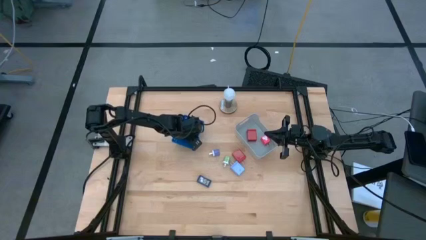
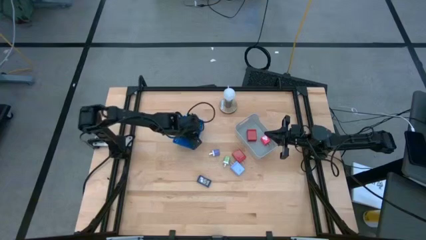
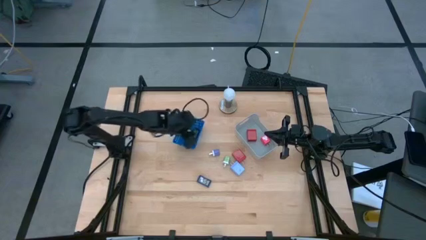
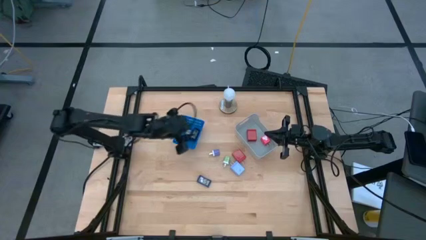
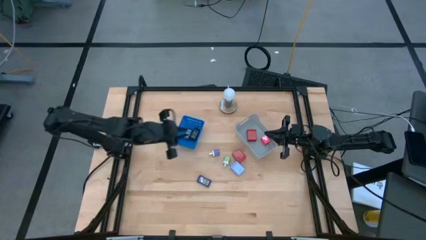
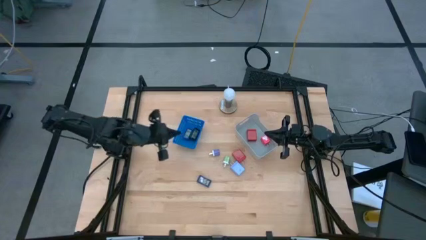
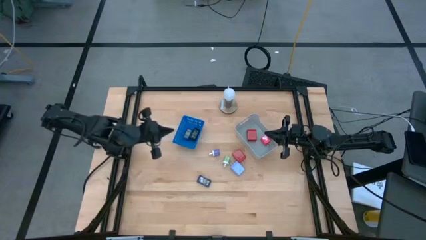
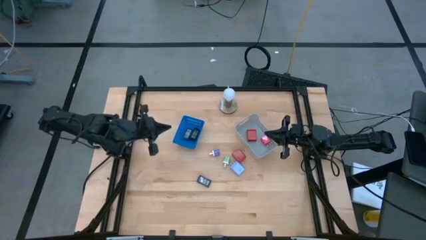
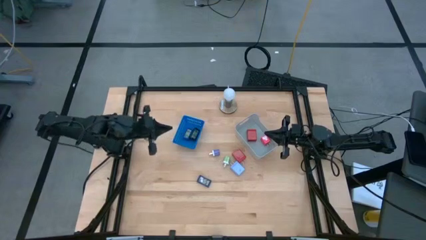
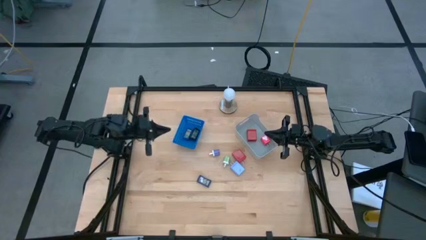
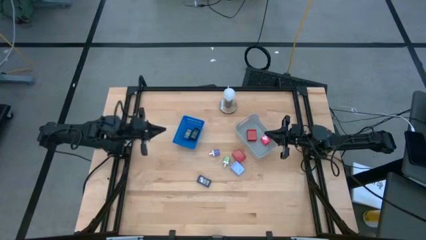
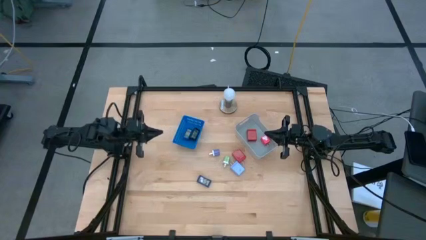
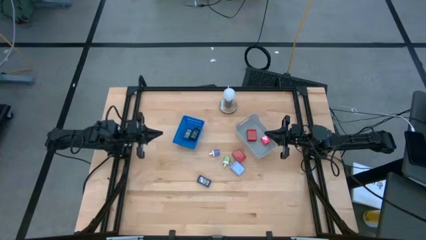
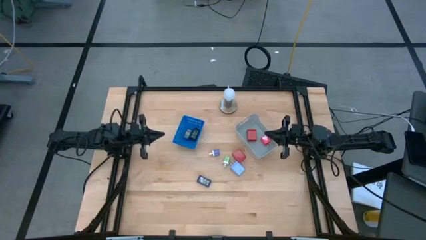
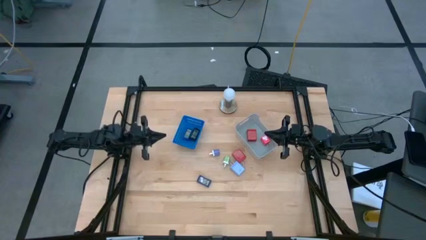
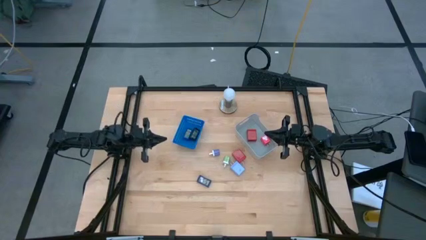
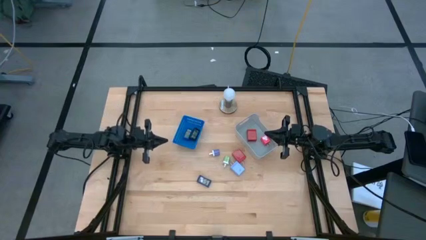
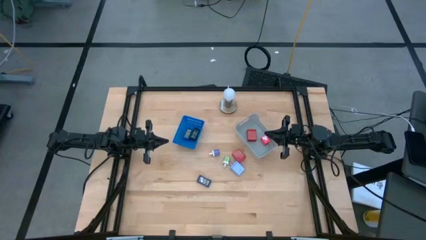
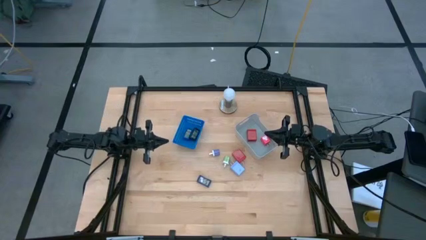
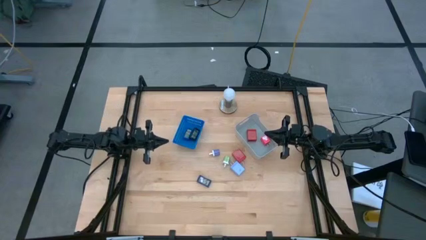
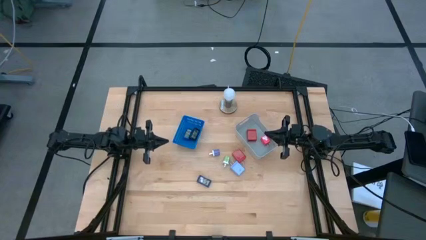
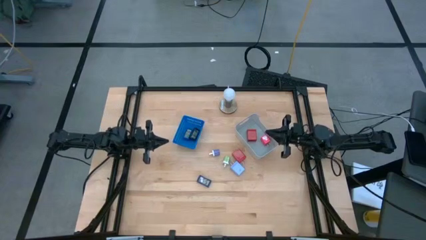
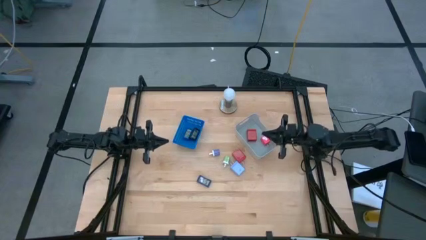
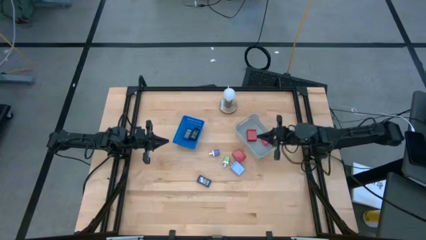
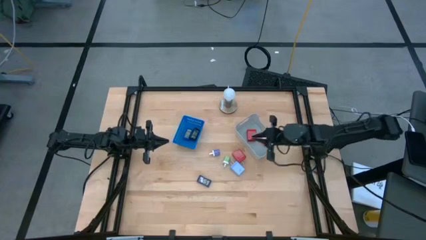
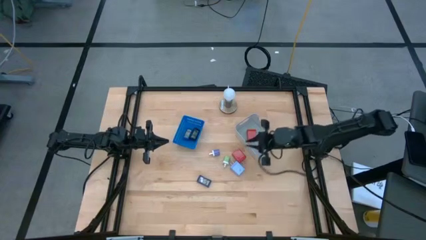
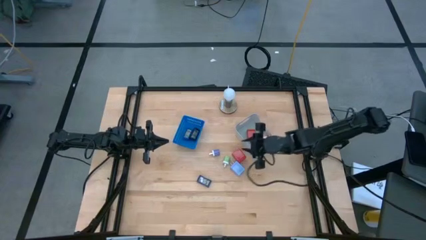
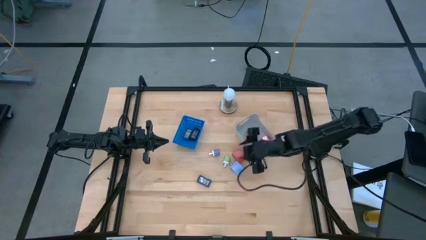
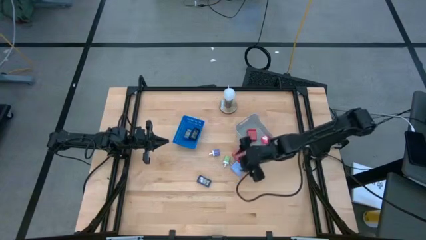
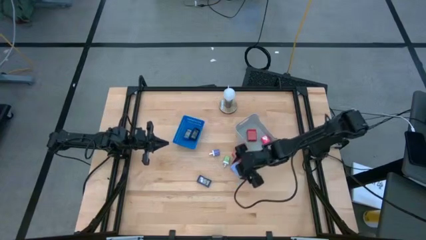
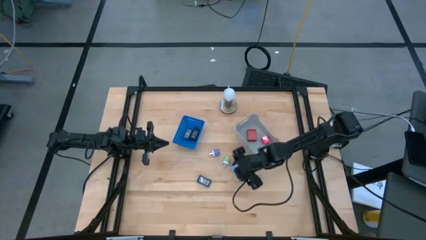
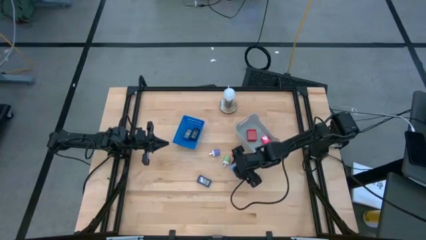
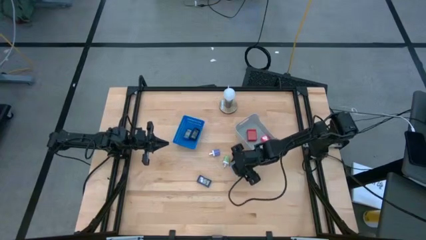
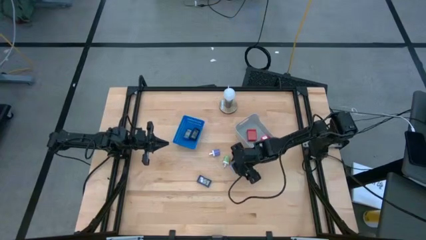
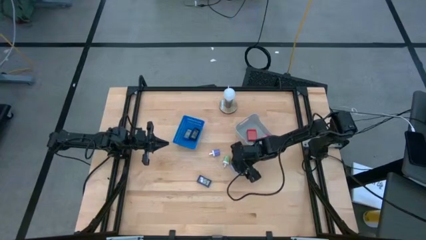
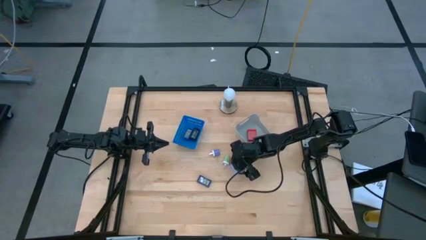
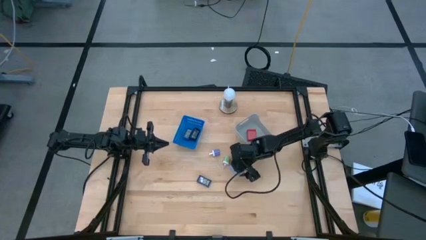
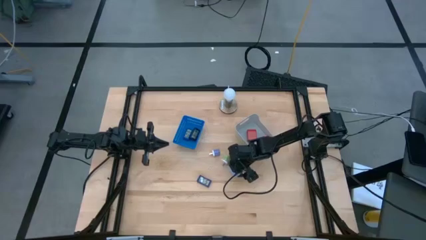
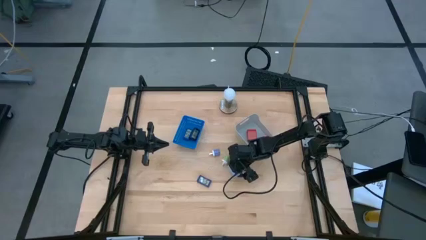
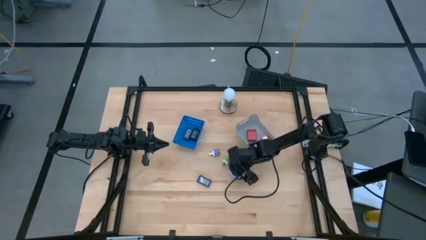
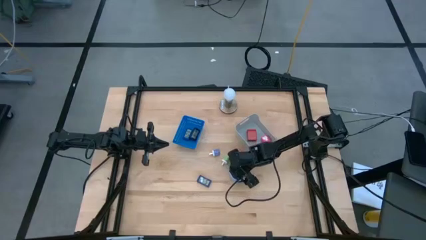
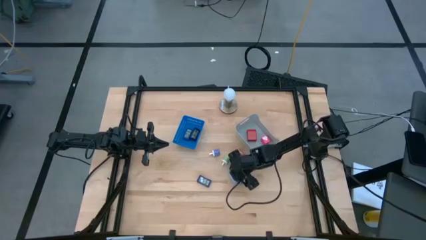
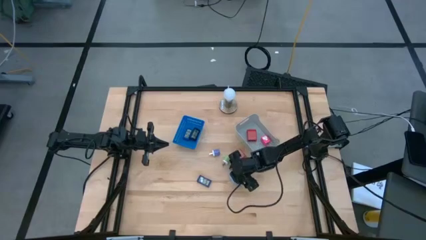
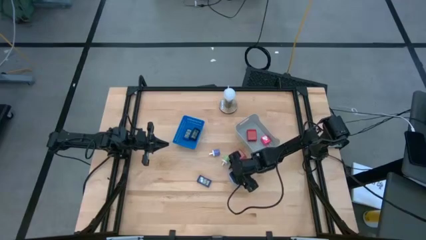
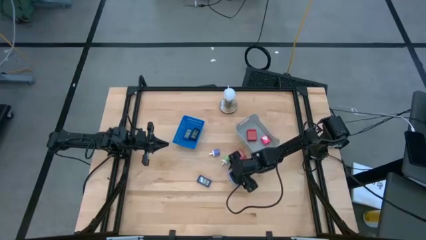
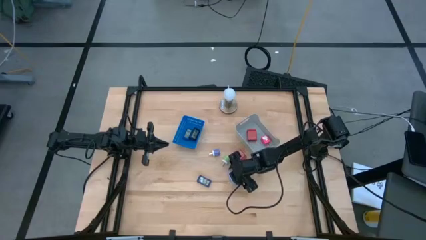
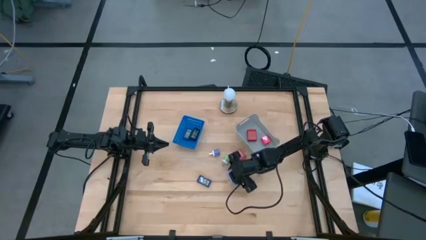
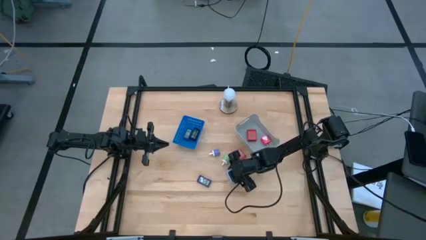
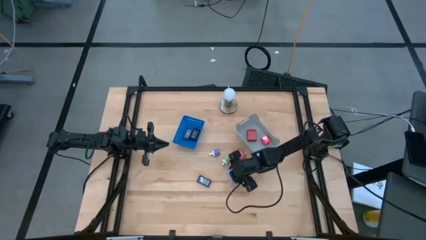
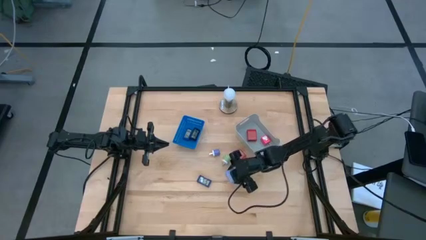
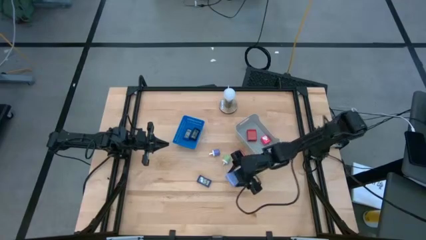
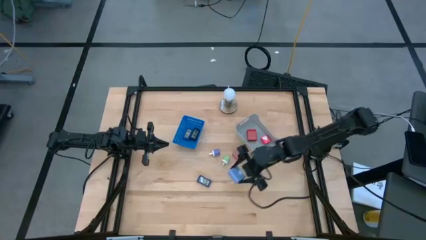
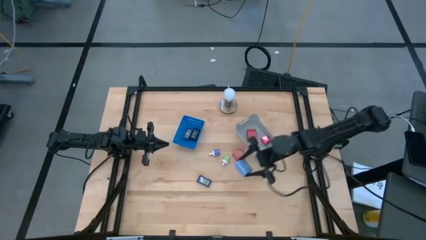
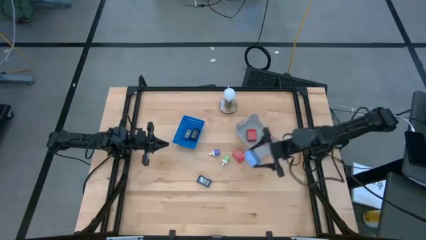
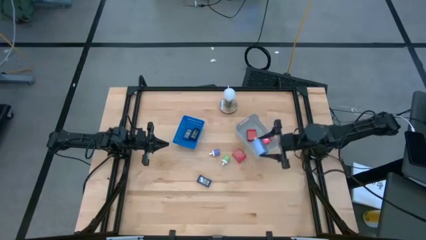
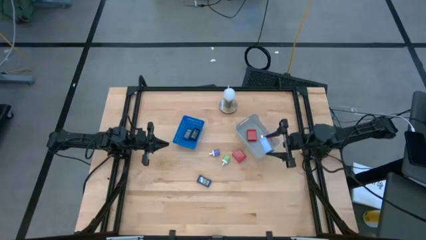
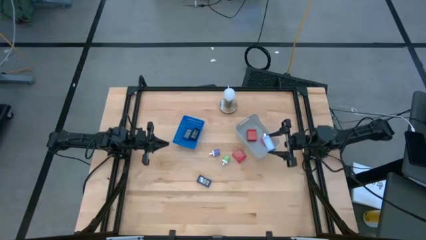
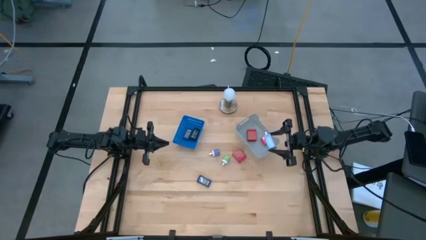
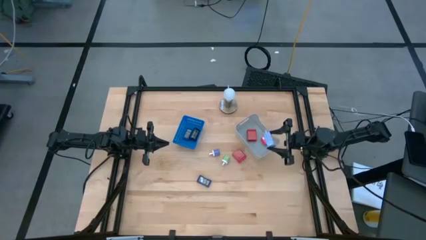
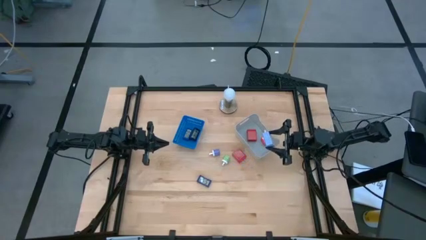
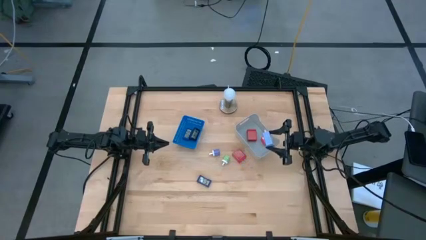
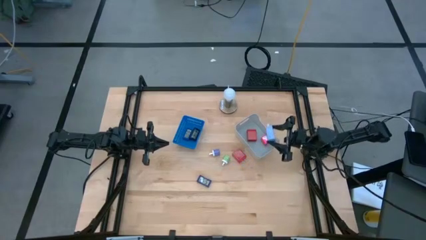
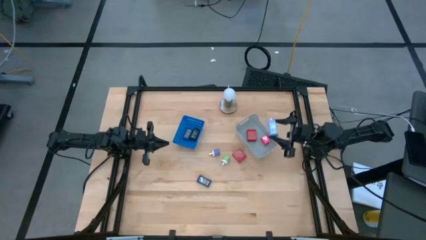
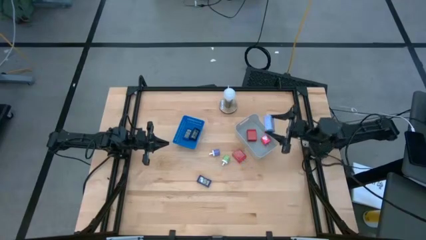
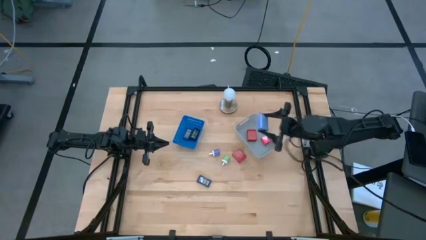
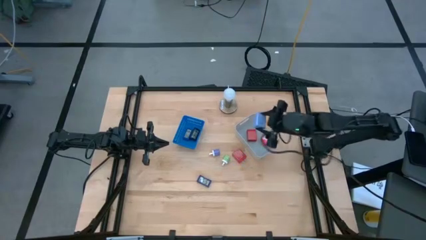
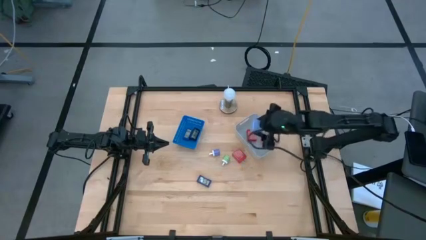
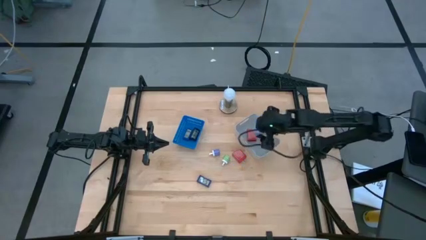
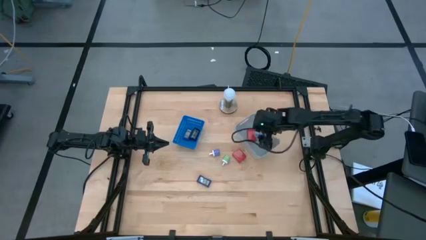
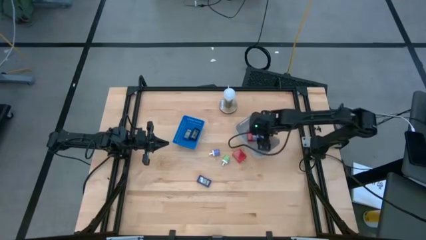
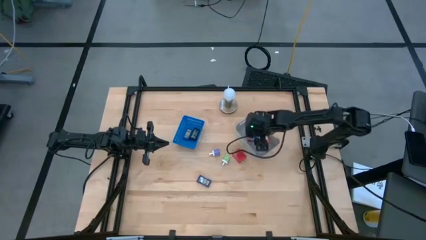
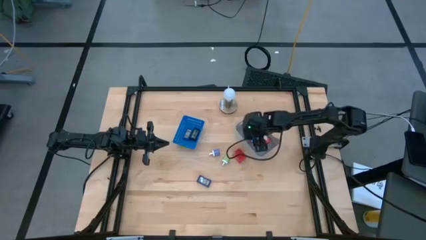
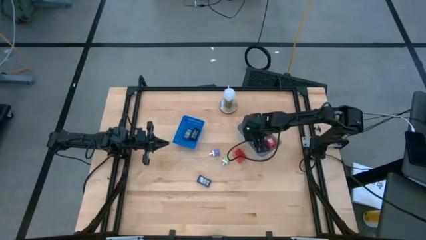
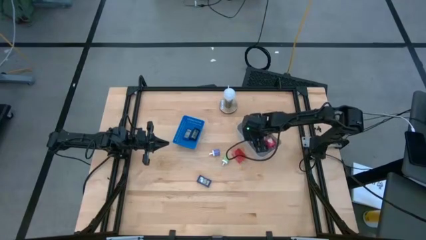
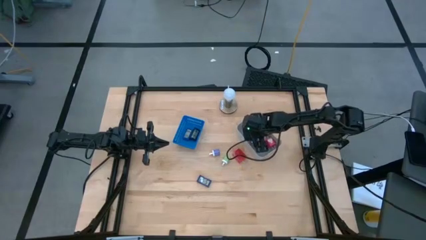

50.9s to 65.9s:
Task: Pick & Place Office items
Put the light blue charger into the gray bin
